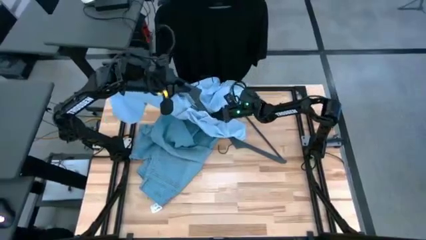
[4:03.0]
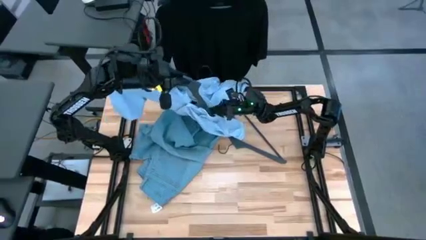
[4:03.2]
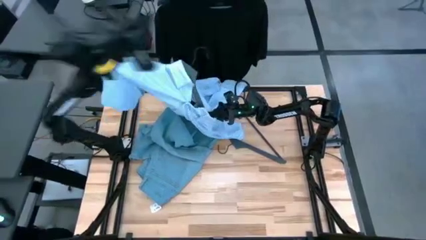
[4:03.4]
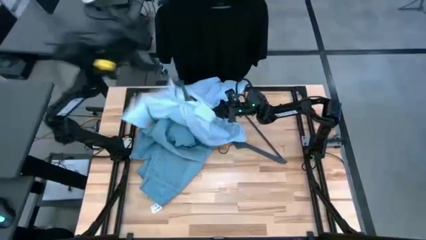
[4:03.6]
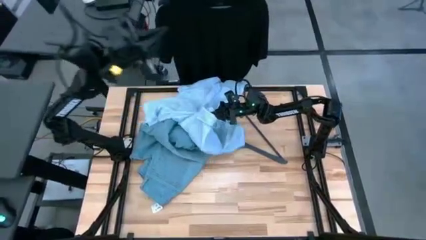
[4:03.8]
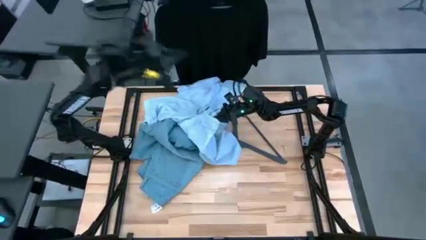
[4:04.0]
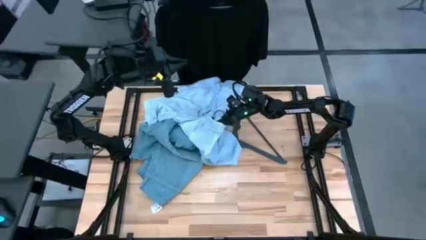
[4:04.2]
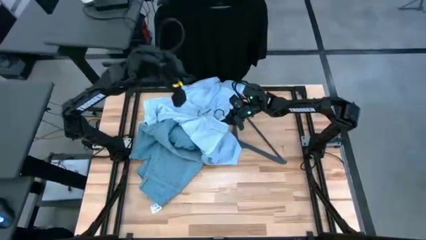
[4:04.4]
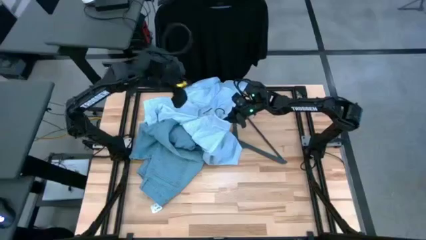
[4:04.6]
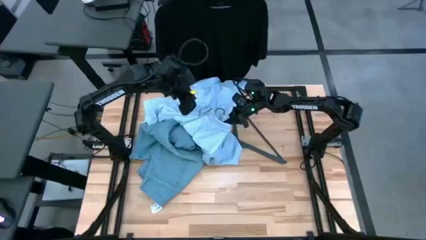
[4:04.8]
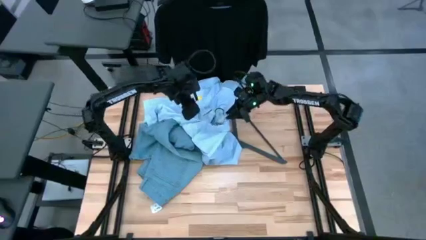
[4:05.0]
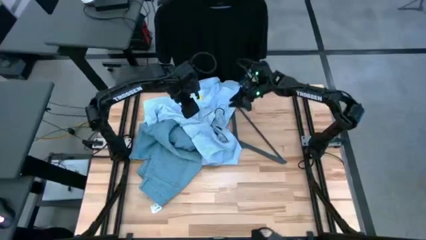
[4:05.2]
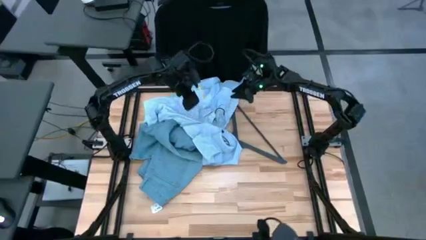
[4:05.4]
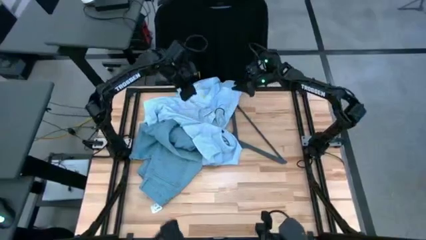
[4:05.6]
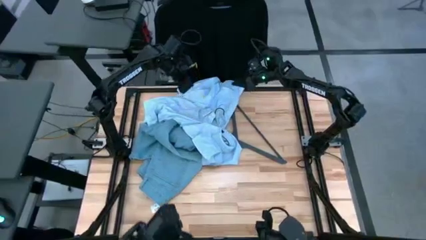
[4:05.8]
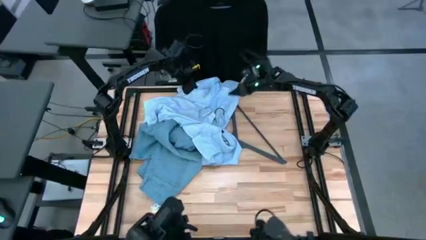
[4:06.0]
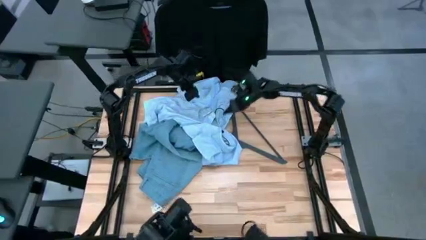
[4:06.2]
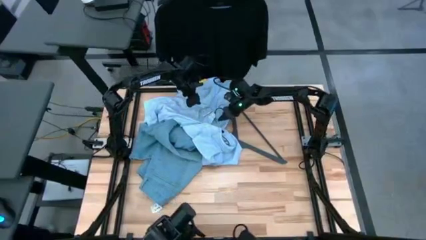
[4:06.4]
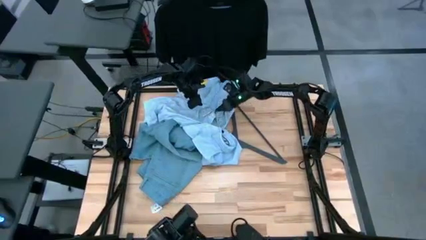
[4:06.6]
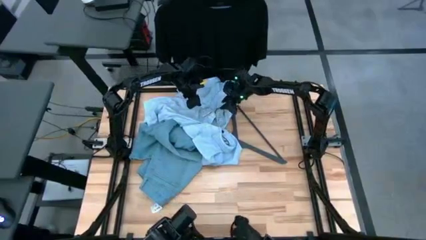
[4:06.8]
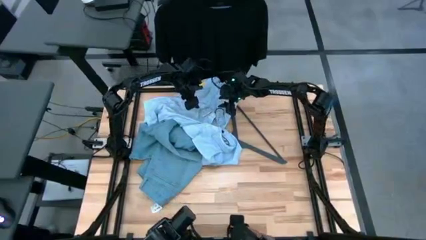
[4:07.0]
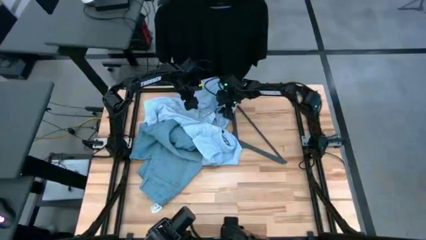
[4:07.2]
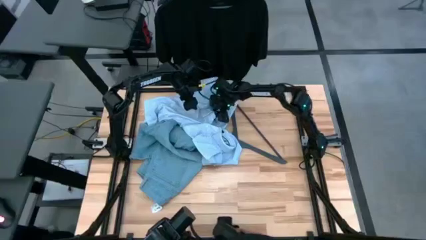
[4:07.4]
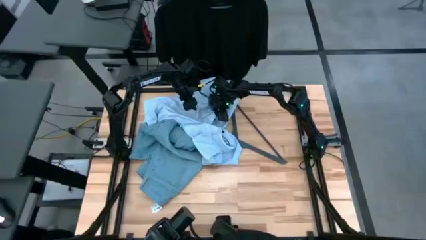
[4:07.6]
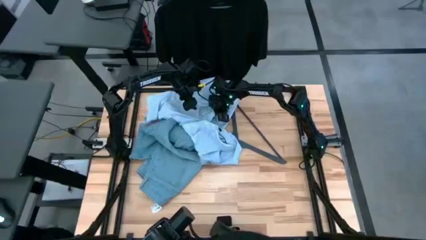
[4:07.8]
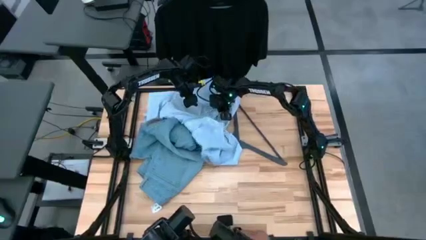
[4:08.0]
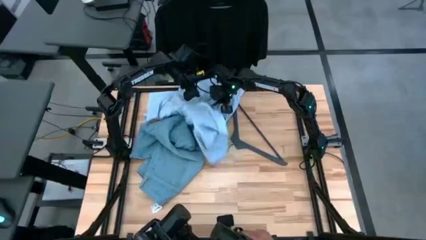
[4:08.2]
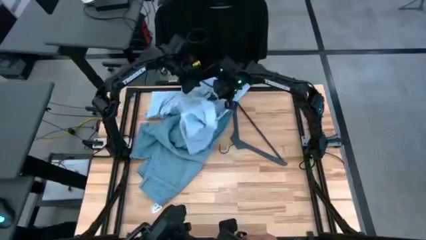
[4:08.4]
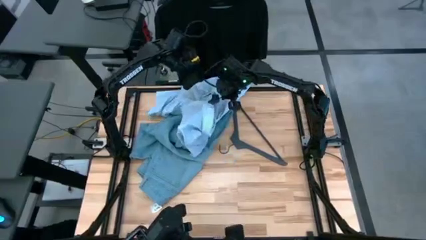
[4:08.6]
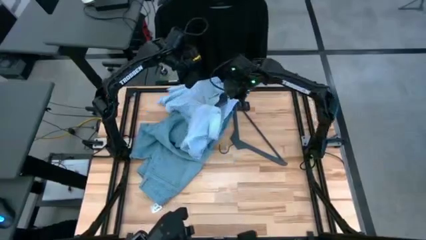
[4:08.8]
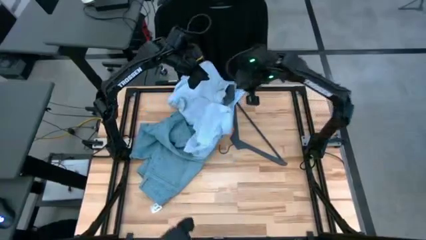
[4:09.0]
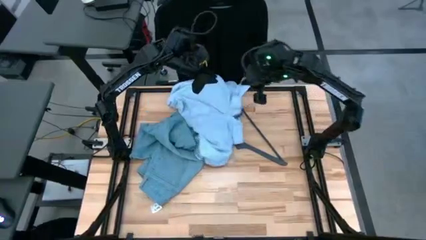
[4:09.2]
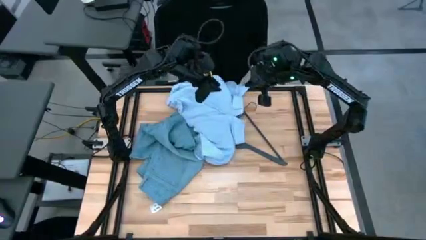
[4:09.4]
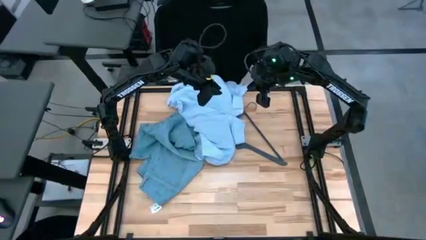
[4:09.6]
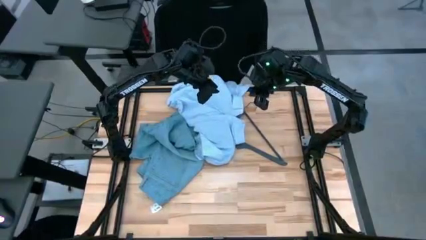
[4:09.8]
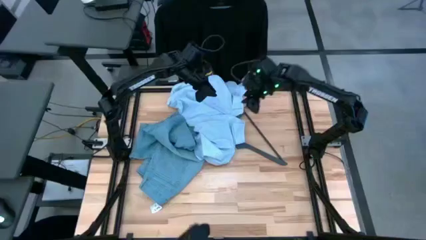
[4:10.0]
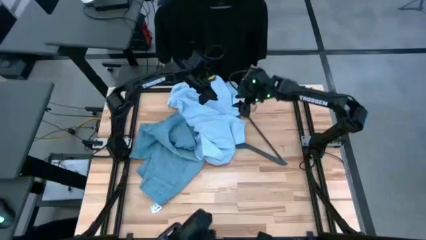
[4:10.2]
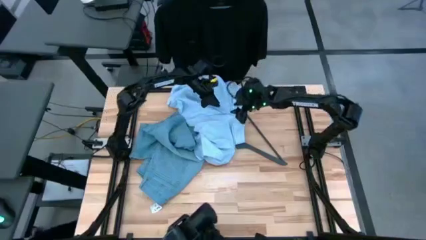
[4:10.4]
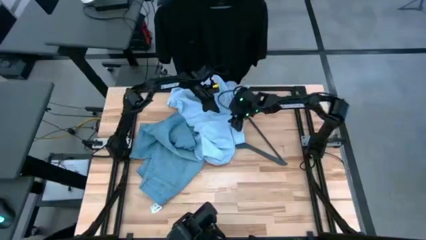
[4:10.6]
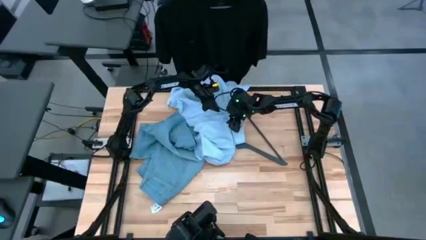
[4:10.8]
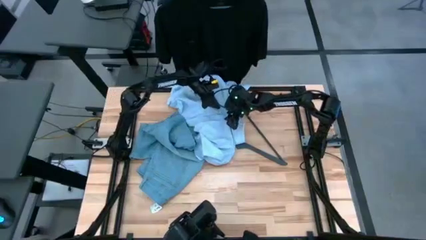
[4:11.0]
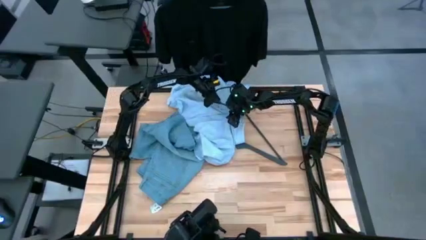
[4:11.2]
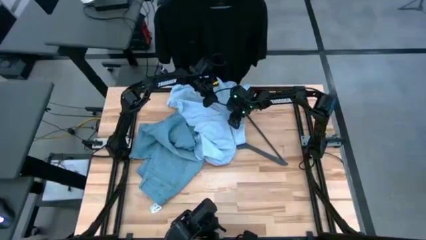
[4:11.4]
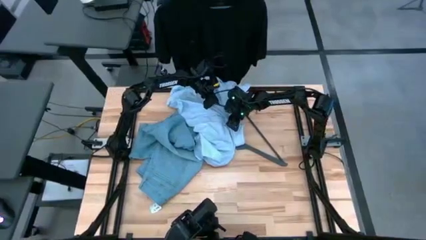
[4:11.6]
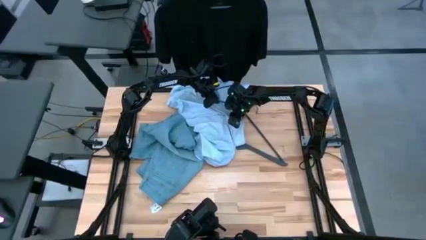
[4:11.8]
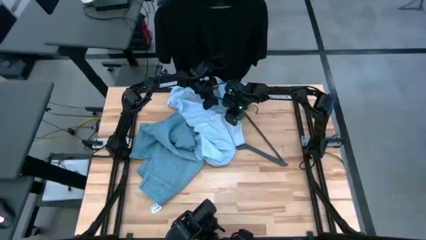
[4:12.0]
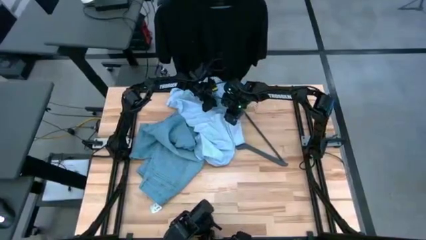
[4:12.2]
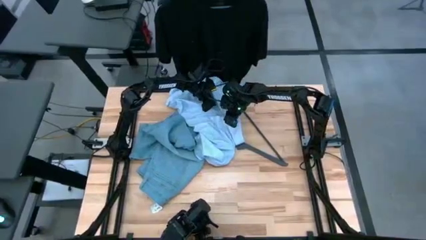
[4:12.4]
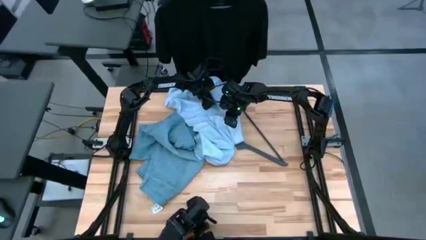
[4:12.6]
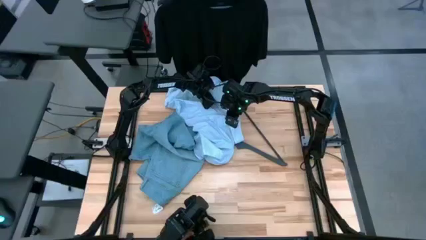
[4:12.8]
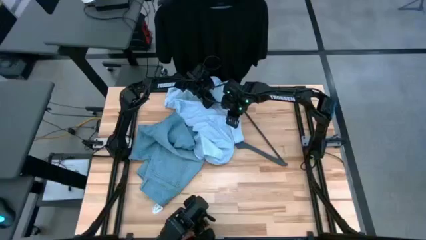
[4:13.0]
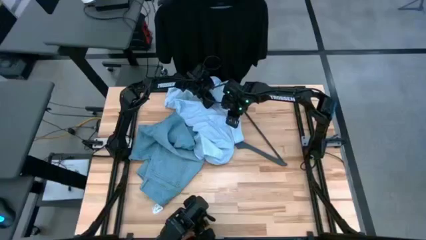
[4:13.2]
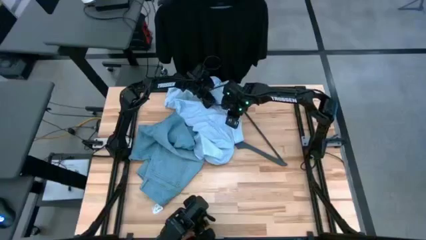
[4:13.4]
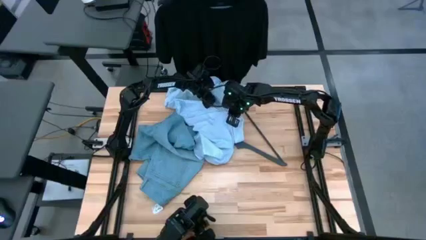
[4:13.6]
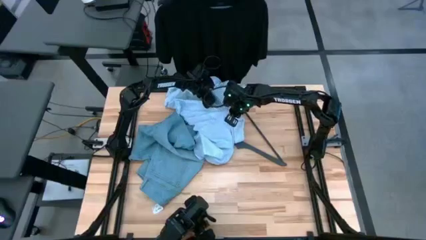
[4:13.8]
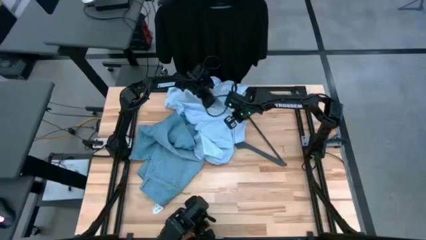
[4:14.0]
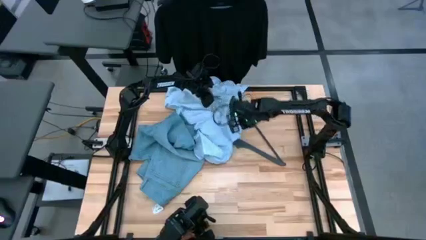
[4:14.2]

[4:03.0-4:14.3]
Task: Hang clothes
Unhang the blue shirt from the rack

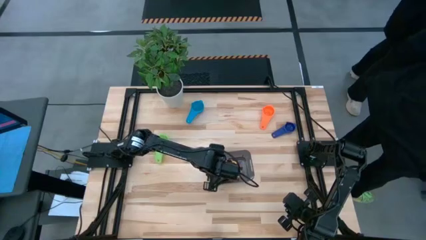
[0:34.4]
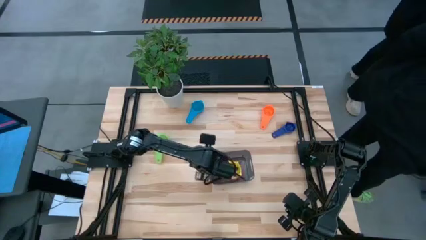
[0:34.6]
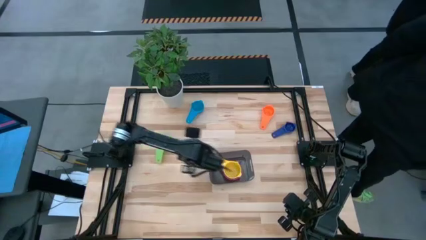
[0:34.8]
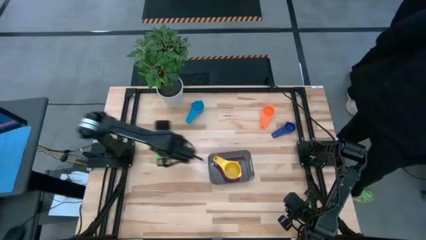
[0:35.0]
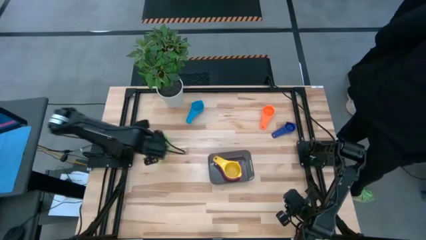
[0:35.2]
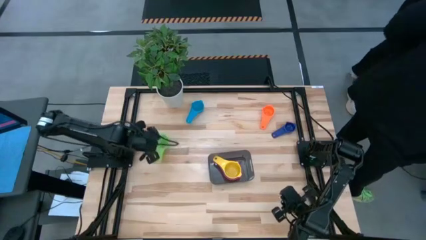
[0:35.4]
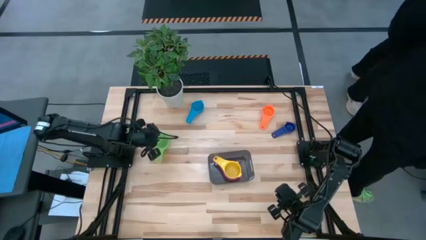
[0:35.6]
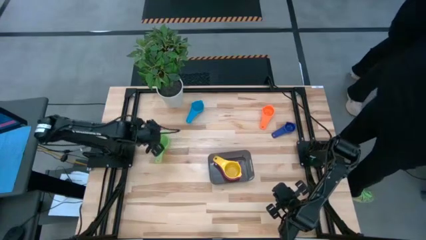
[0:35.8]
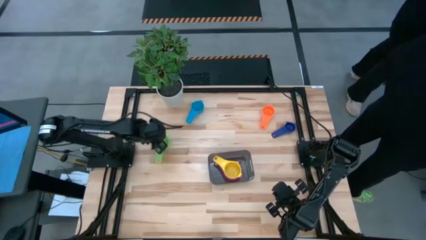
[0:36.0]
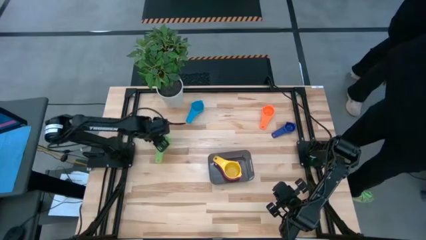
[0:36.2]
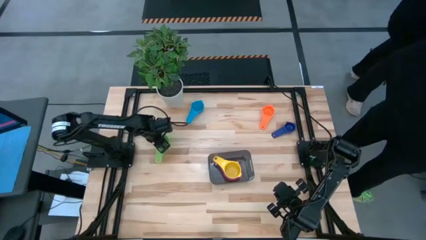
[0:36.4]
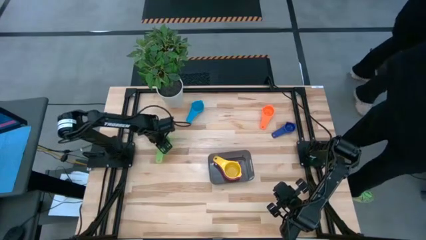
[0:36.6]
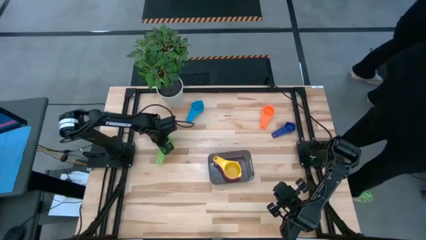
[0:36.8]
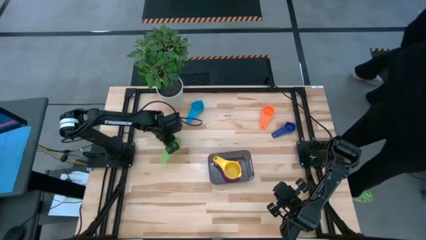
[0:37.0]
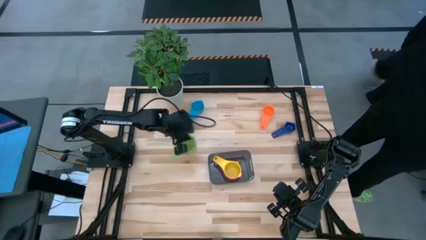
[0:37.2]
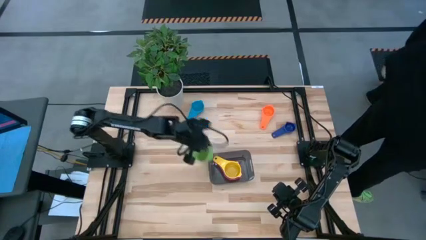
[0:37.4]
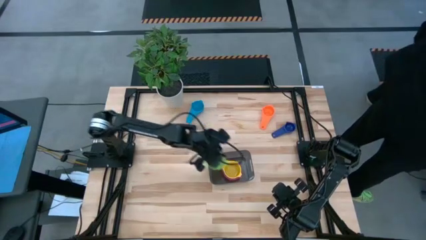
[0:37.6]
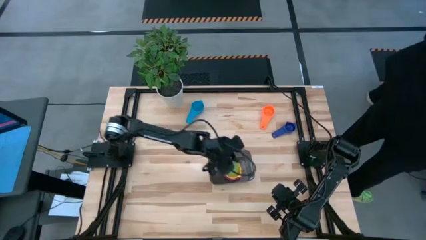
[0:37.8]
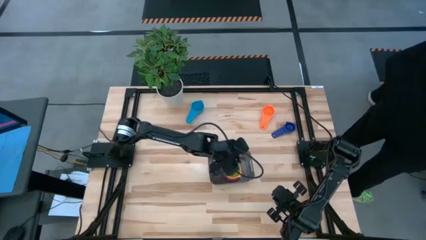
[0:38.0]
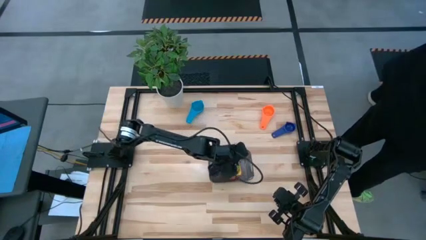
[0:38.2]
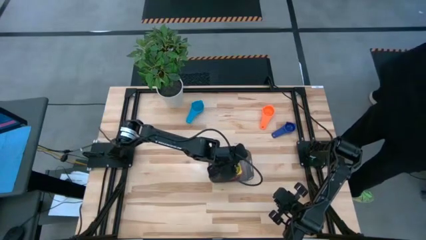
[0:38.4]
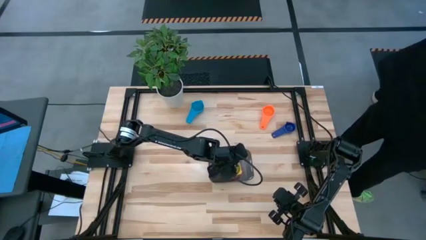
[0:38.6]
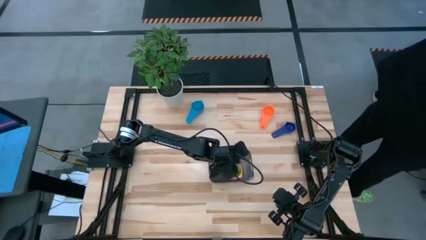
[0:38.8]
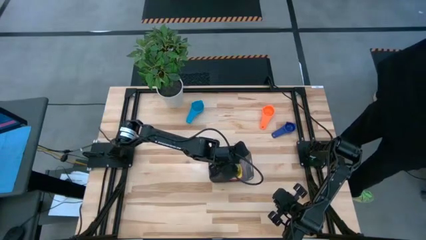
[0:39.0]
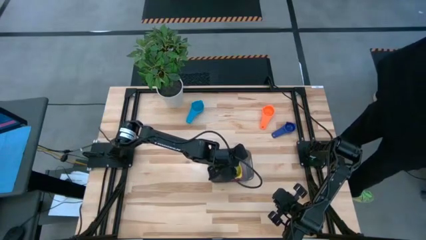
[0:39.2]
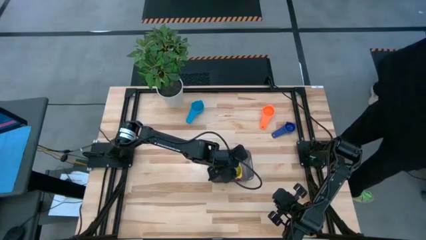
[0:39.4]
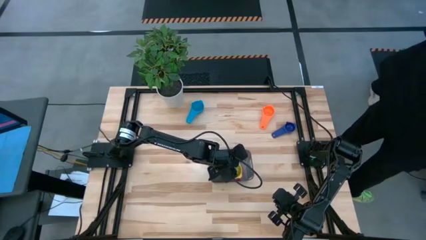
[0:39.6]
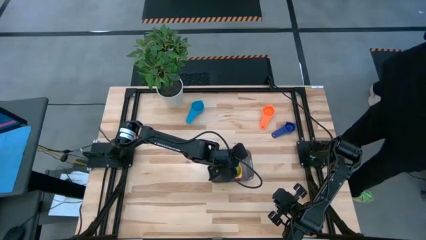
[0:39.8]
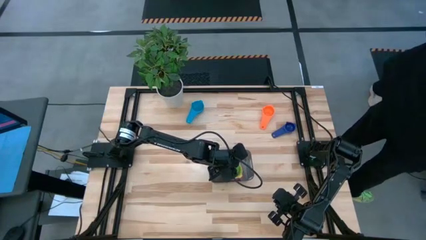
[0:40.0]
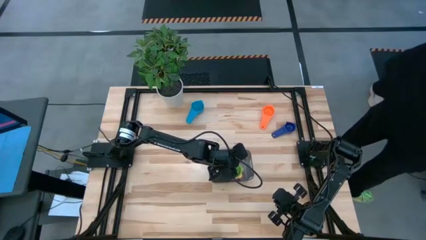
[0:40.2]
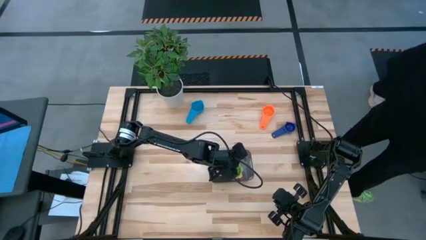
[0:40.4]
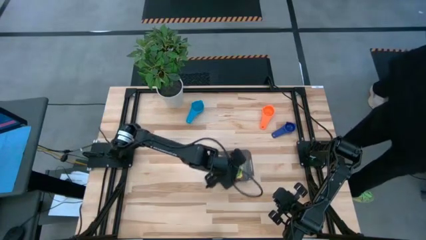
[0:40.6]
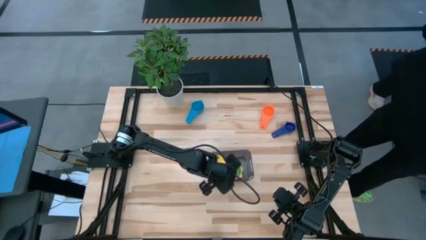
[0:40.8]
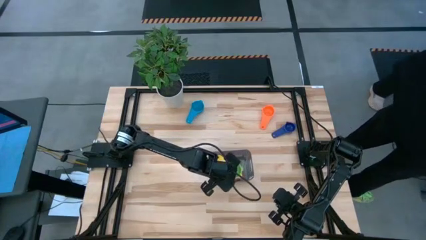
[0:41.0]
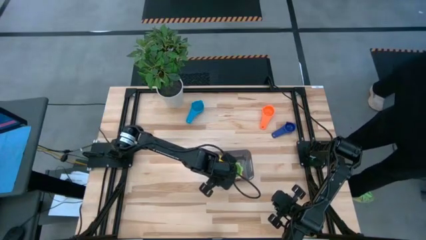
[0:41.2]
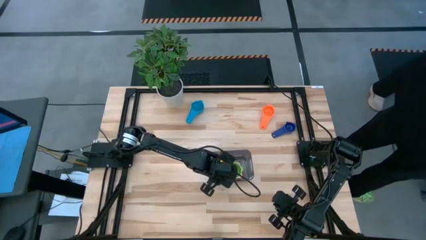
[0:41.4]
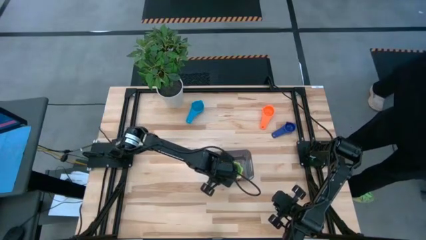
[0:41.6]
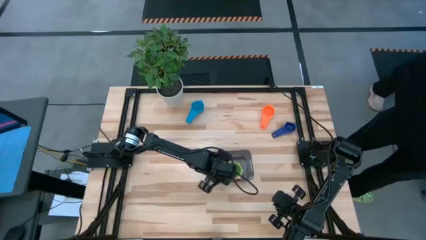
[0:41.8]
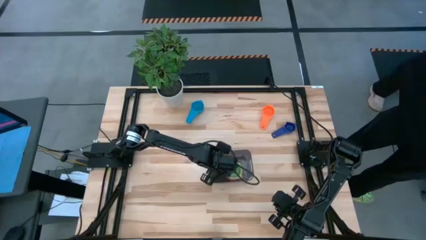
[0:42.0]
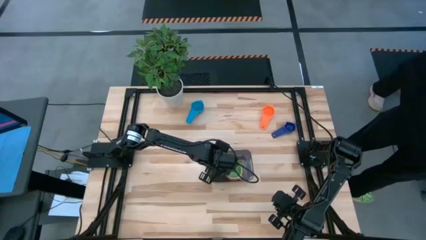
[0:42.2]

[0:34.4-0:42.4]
Task: Nest measuring cups in basket
Stack the green measuring cup on top of the yellow measuring cup into the black bin
